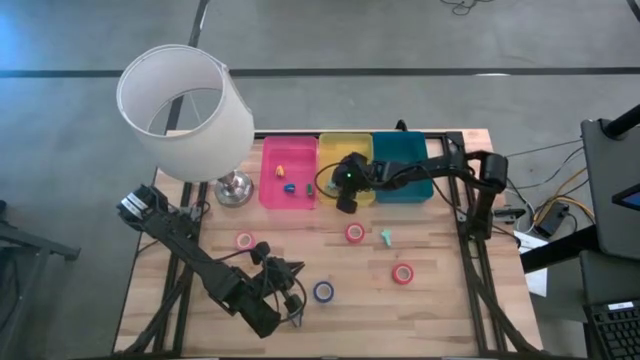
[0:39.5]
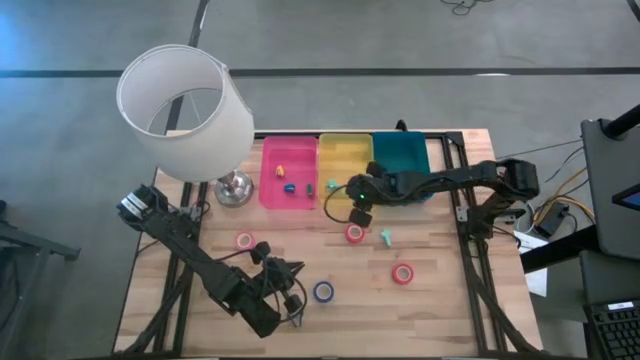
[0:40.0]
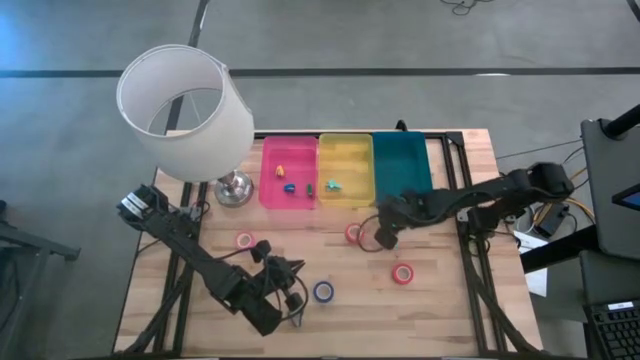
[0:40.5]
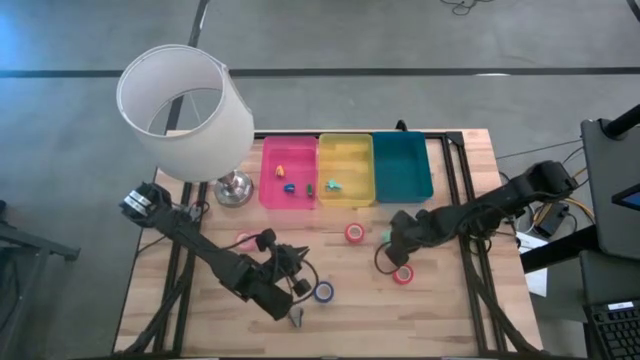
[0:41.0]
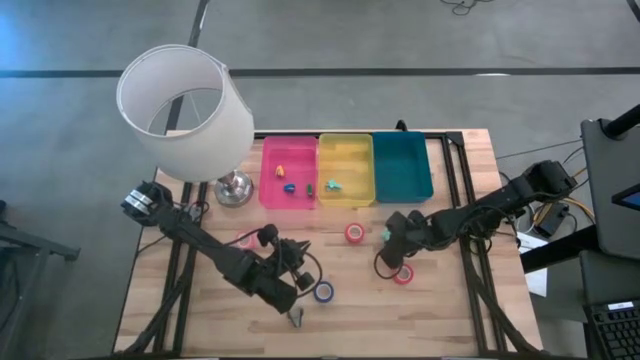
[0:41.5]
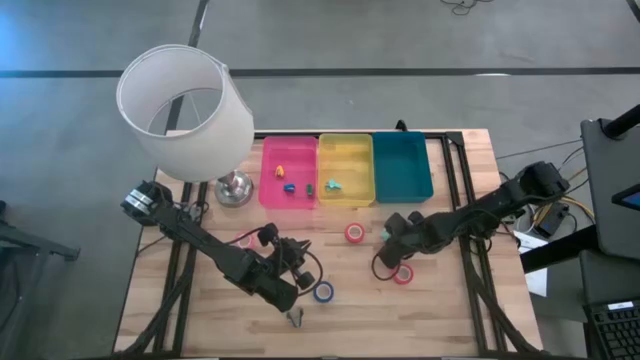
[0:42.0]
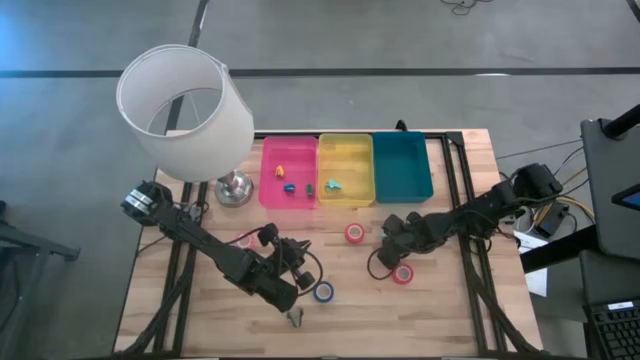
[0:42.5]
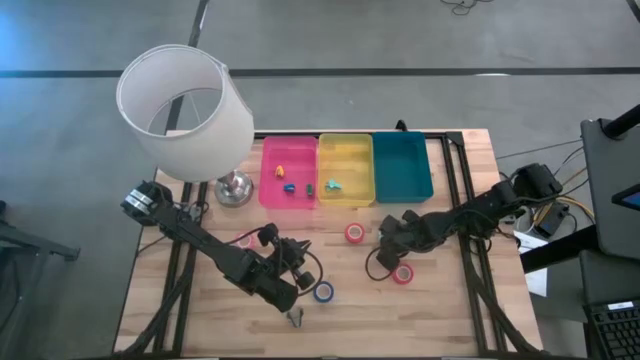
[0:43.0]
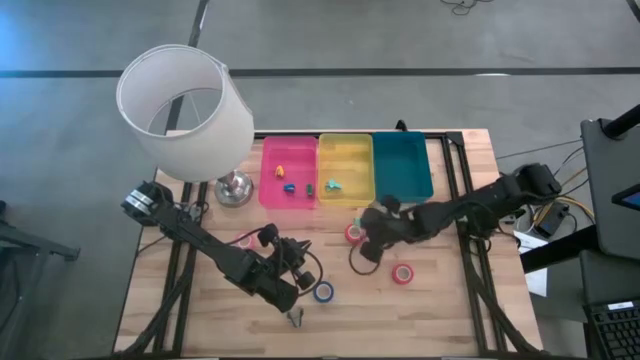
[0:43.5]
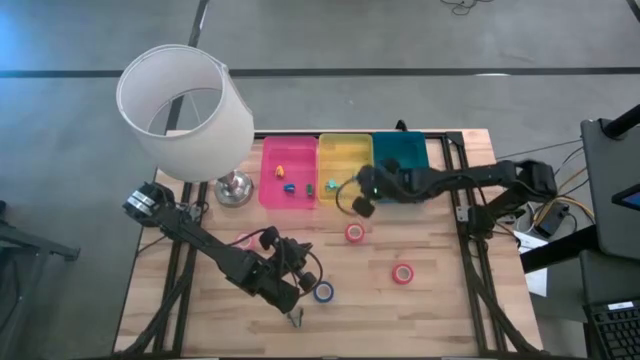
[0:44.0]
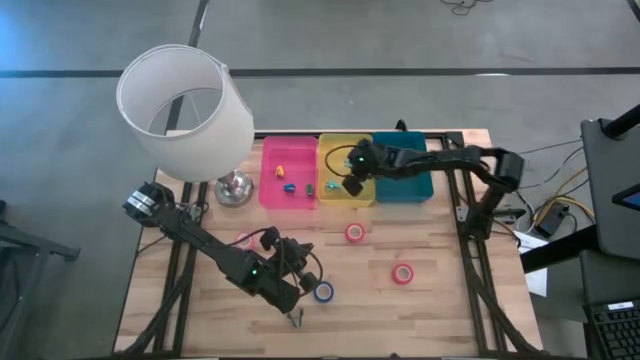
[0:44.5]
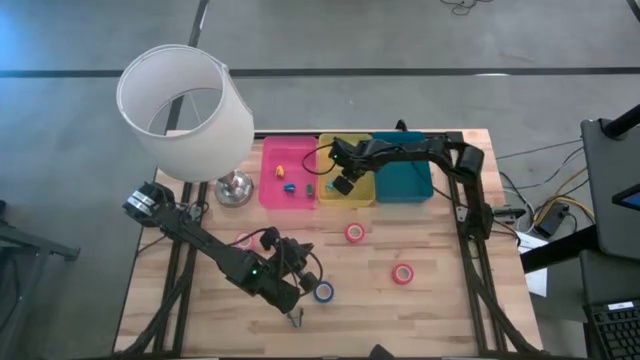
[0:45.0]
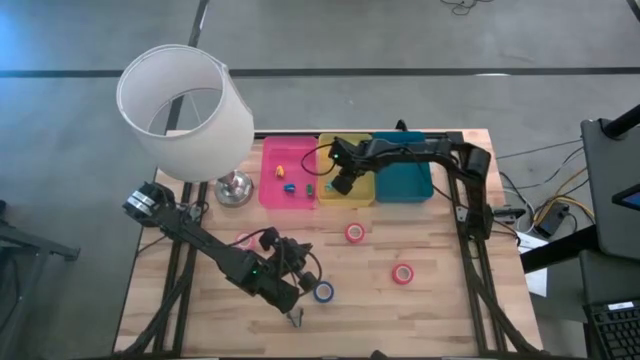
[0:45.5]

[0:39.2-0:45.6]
Task: Pick and place Stapler, Stapler remover, tape
Put the blue staple remover into the yellow bin

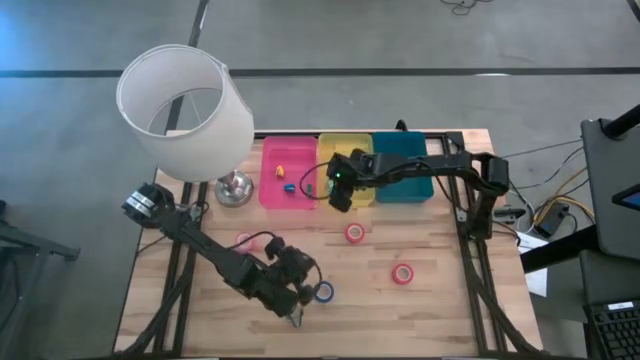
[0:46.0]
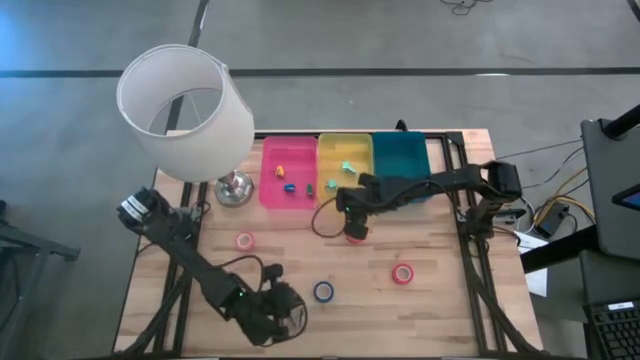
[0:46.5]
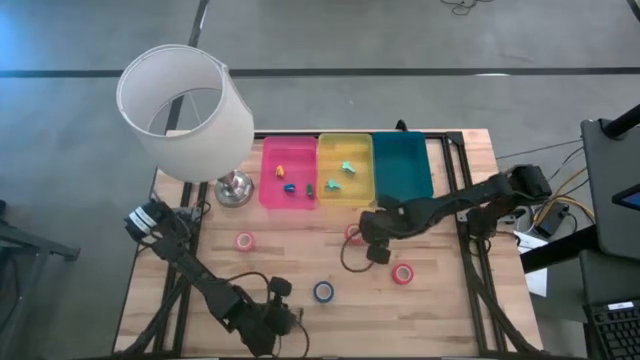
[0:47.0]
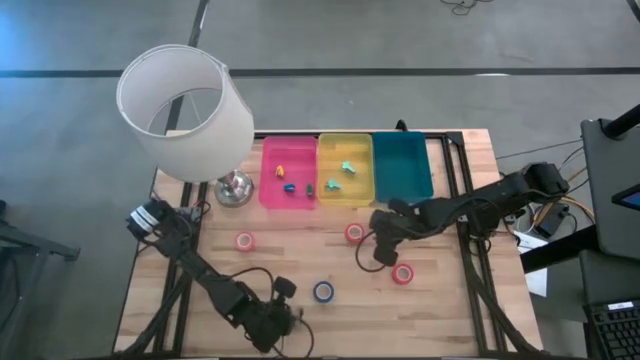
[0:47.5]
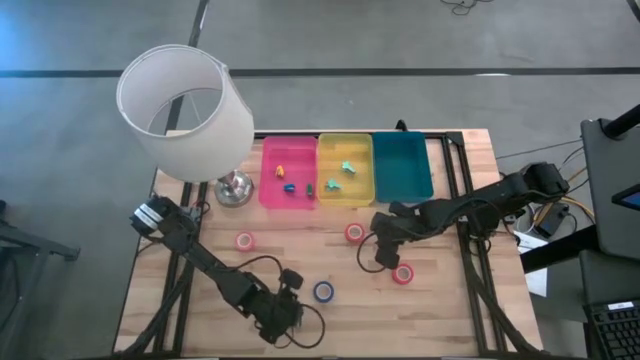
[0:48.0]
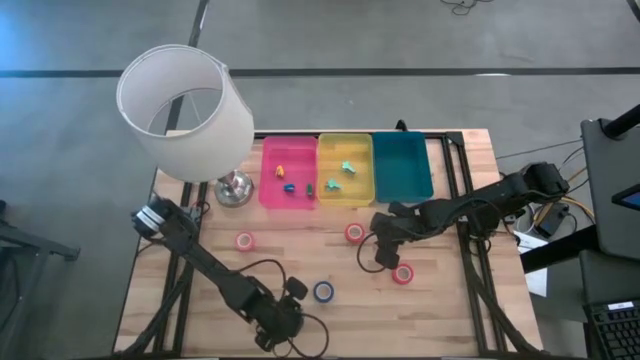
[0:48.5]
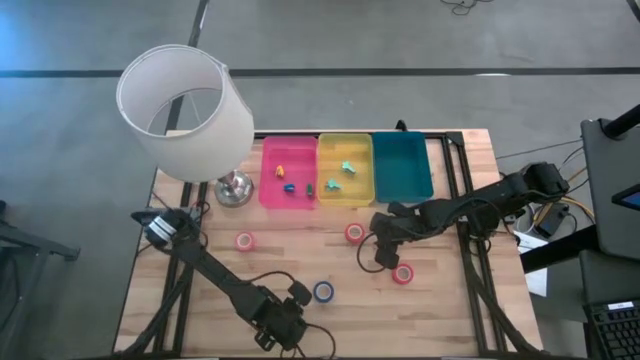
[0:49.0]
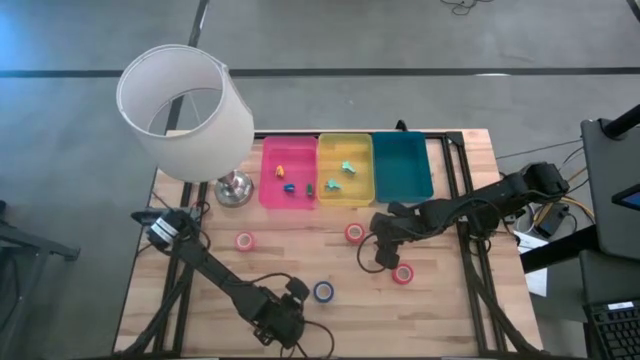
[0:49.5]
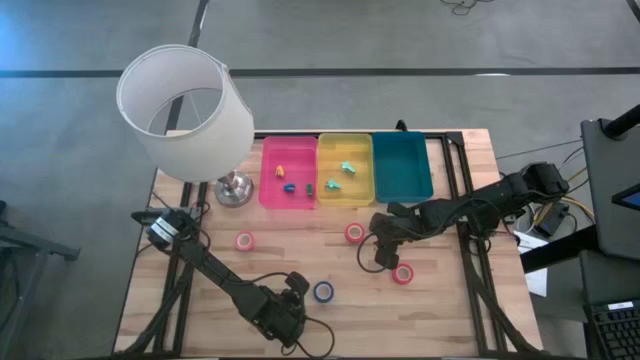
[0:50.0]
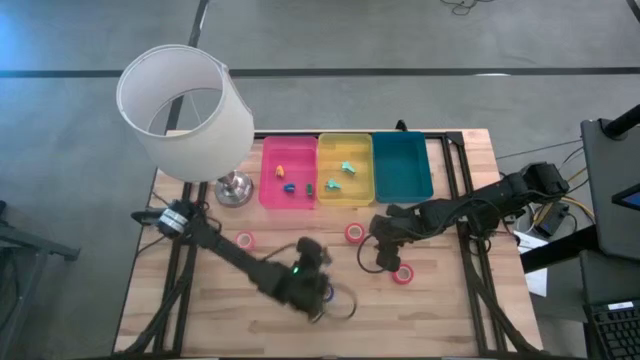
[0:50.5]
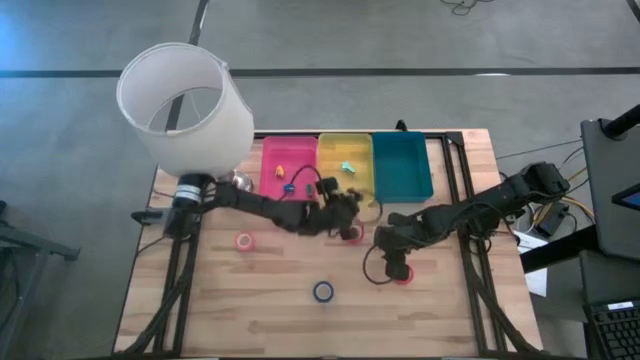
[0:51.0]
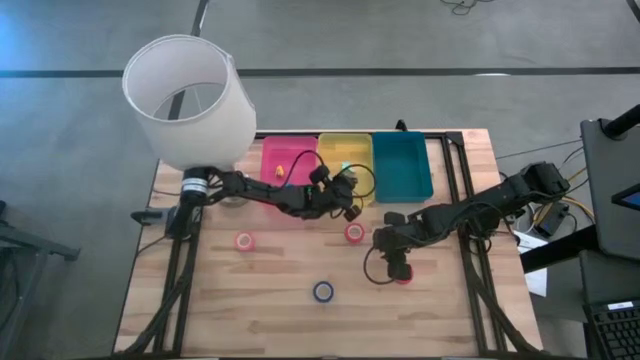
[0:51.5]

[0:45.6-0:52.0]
Put the black staple remover into the yellow bin

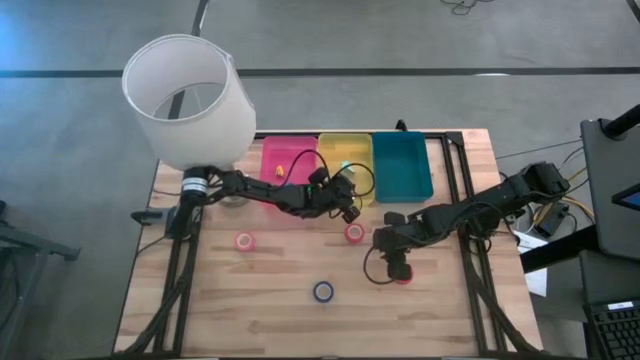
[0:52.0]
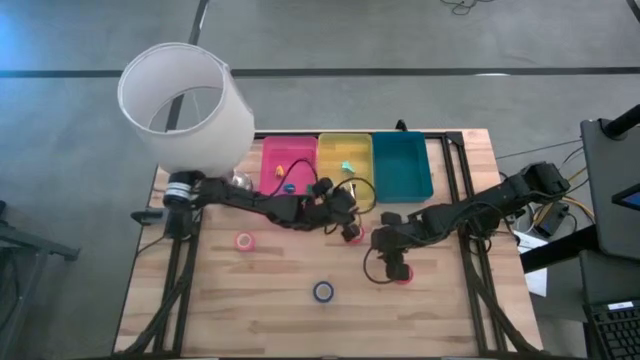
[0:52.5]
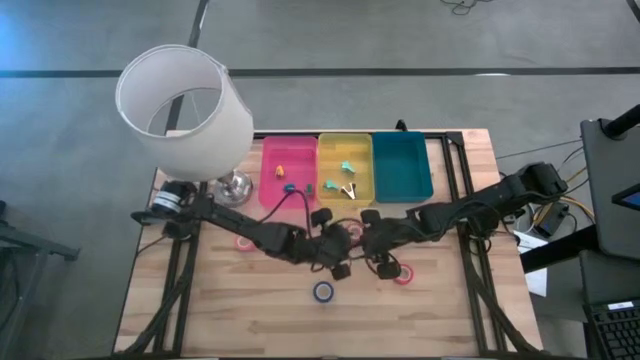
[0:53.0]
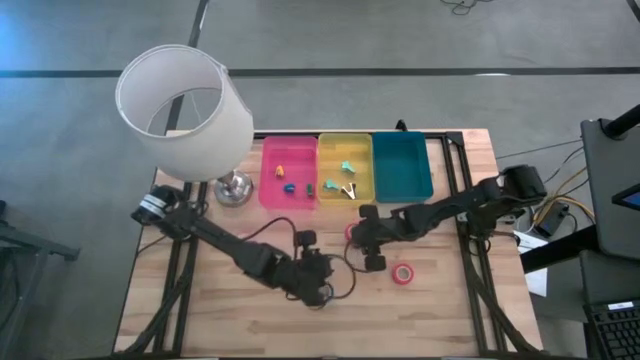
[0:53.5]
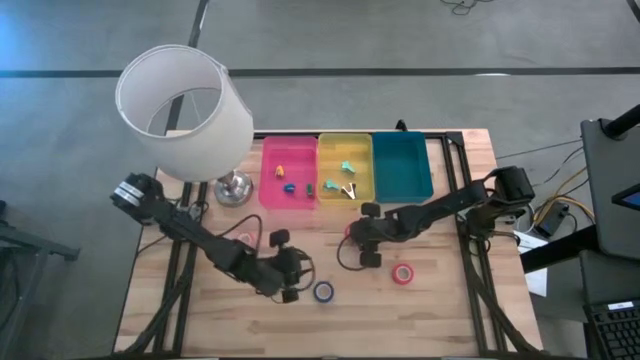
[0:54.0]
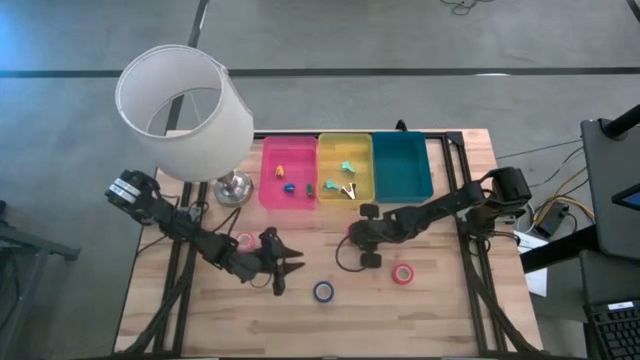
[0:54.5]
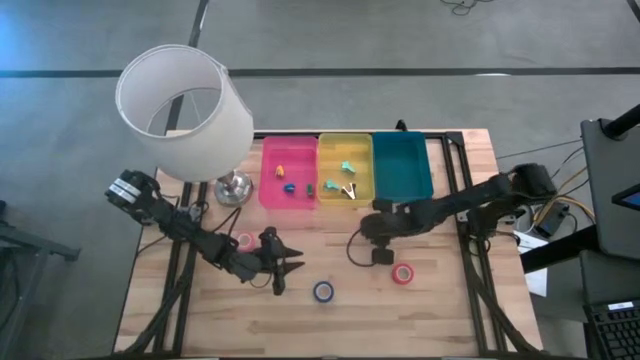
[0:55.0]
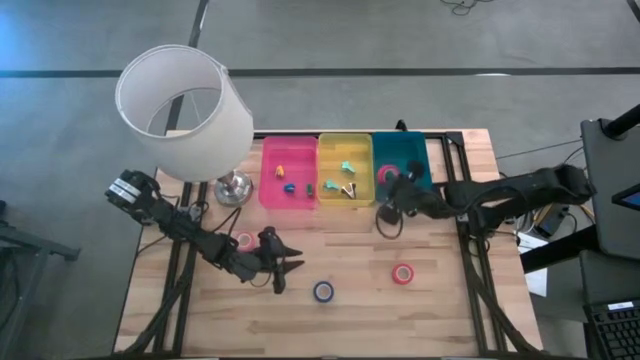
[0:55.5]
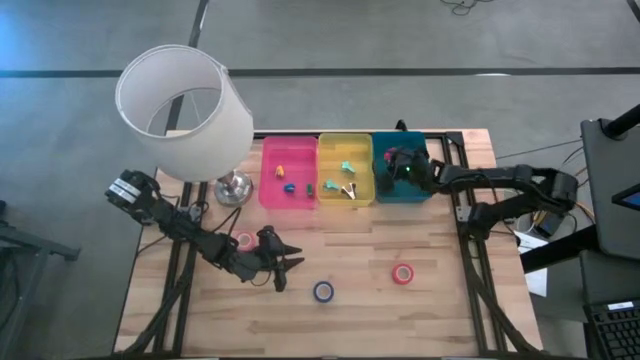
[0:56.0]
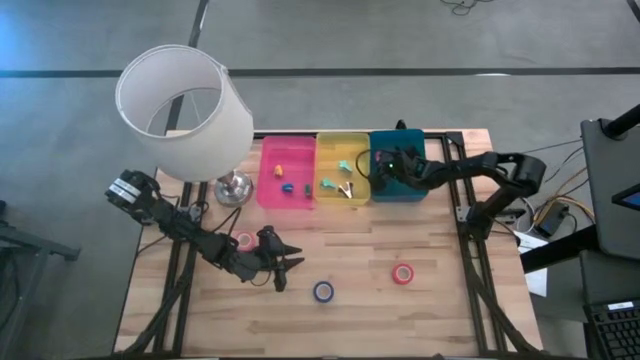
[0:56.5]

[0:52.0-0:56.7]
Put the top orange tape into the blue bin

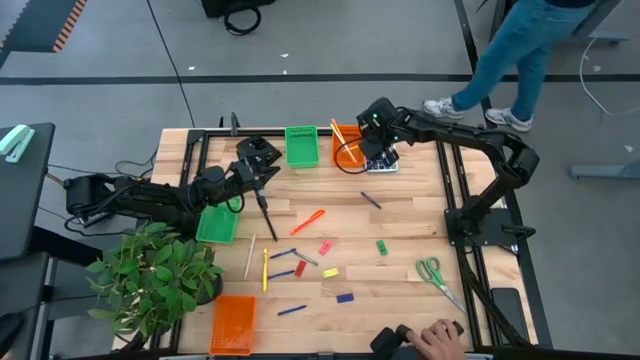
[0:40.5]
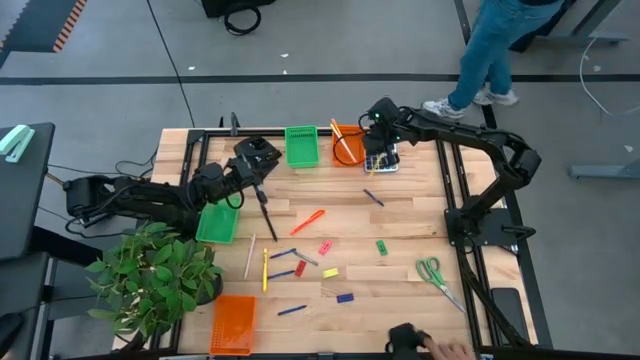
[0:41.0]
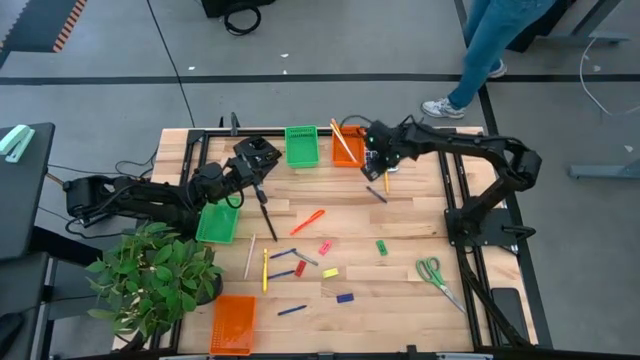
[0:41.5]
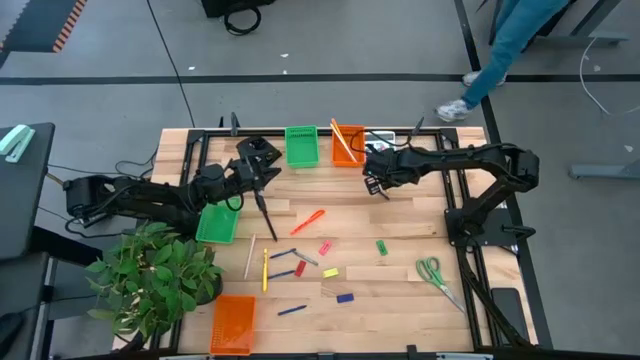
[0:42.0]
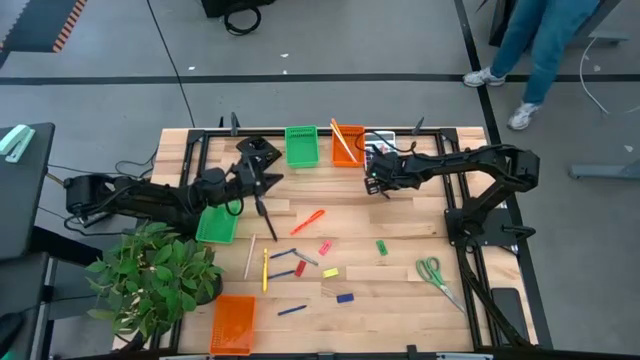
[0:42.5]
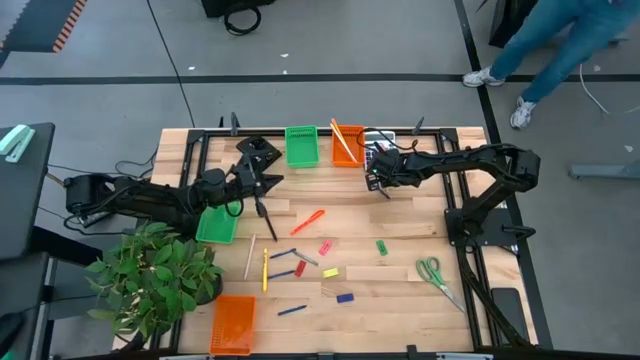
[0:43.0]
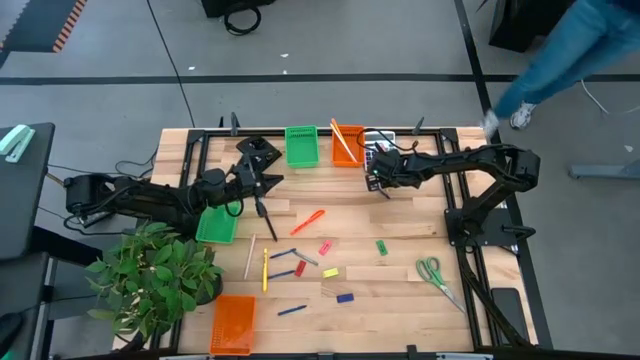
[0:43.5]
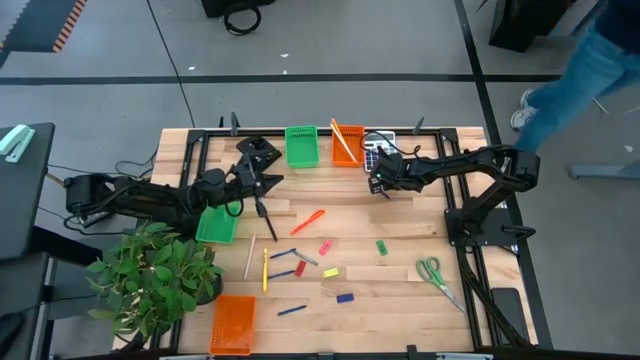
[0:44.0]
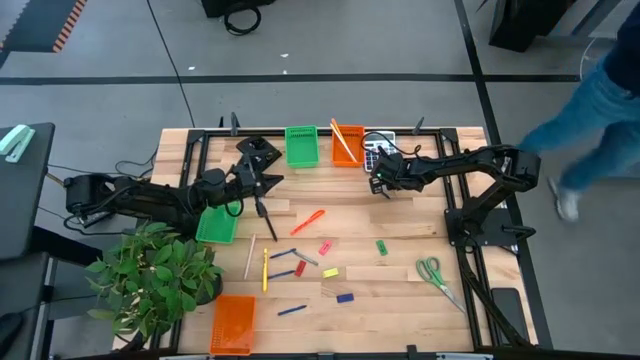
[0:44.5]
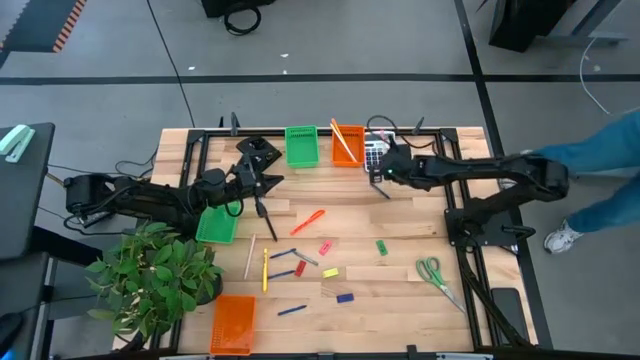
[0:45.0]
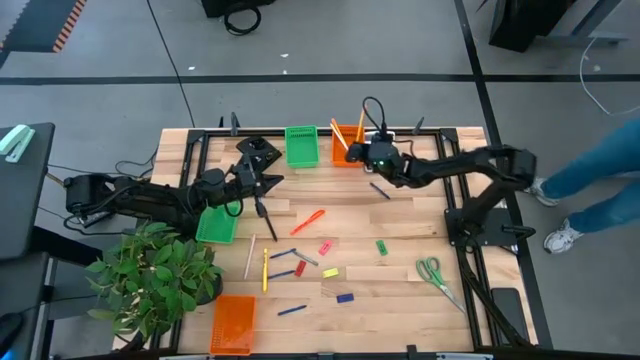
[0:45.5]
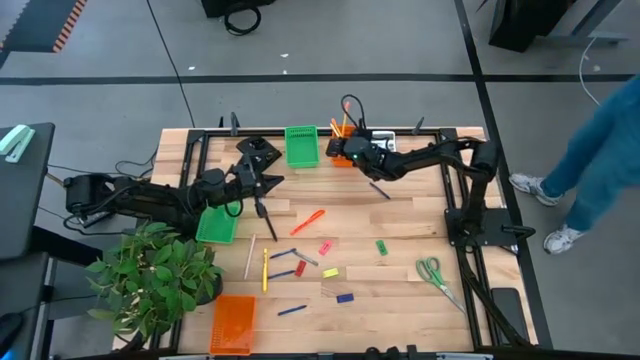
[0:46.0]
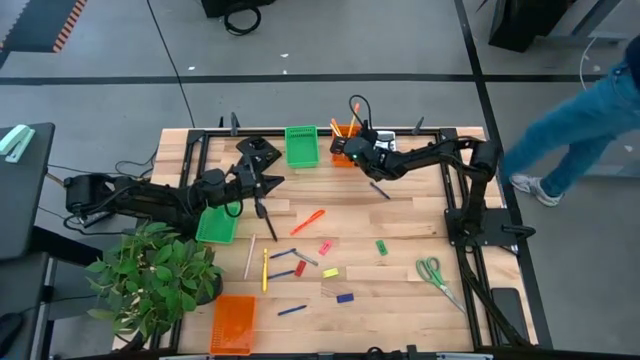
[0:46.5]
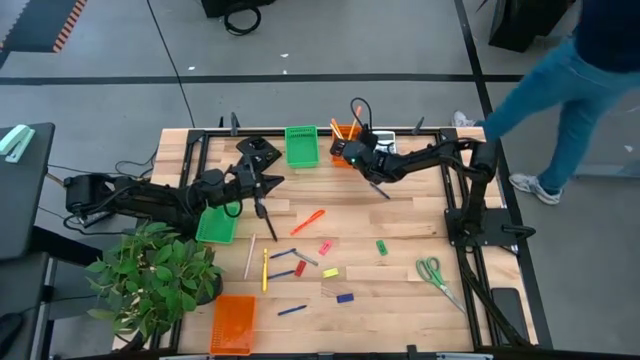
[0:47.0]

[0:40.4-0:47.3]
Task: Sort crayons/erasers/pens/pencils in bins
Put the yellow pencil into the top orange bin
